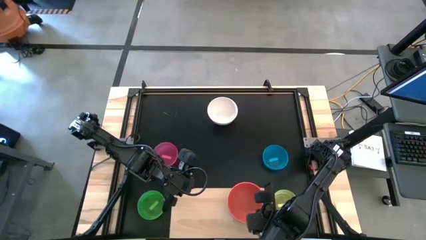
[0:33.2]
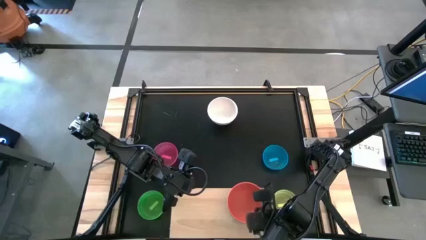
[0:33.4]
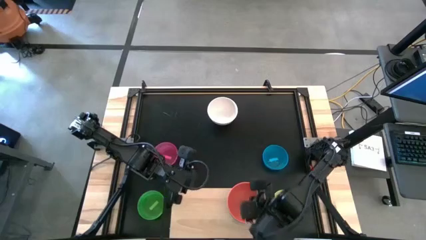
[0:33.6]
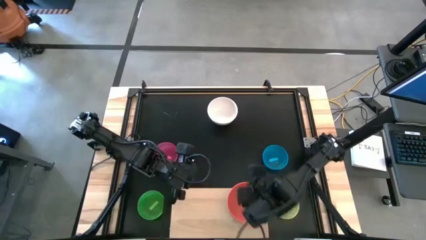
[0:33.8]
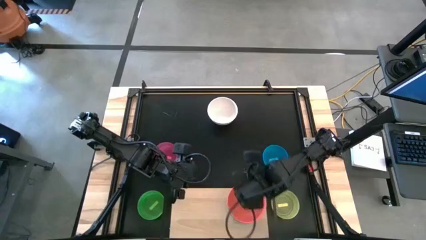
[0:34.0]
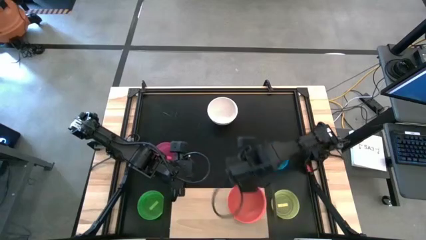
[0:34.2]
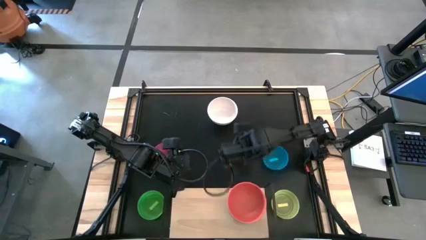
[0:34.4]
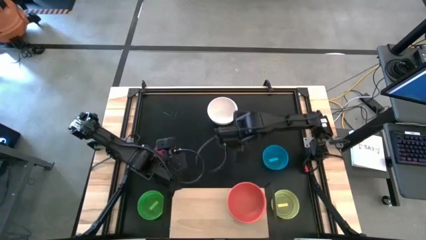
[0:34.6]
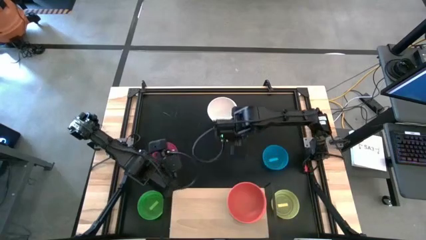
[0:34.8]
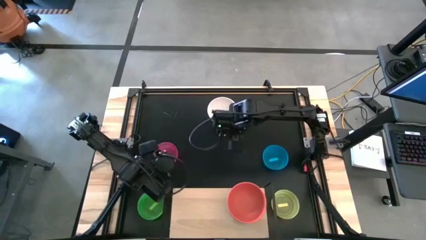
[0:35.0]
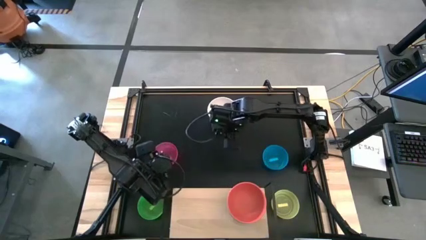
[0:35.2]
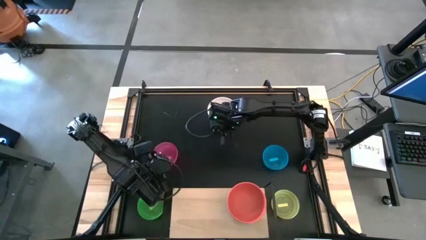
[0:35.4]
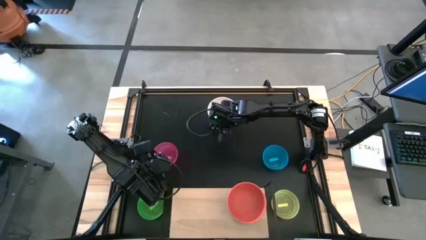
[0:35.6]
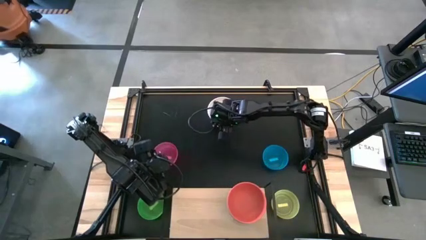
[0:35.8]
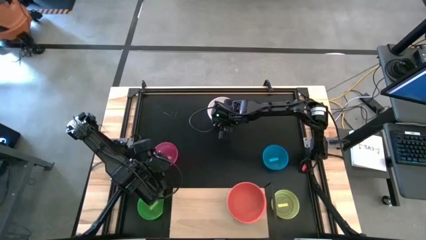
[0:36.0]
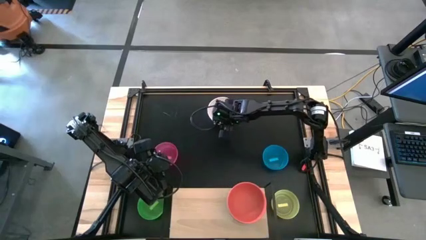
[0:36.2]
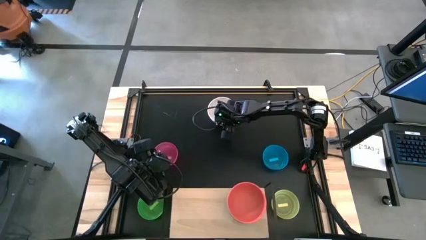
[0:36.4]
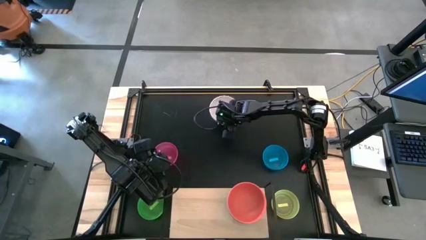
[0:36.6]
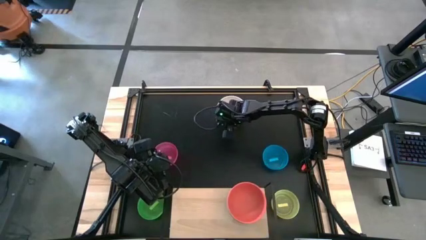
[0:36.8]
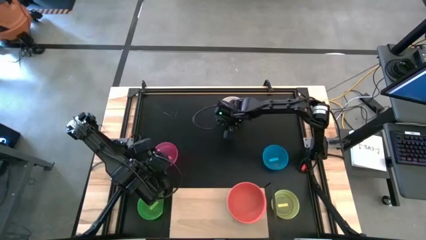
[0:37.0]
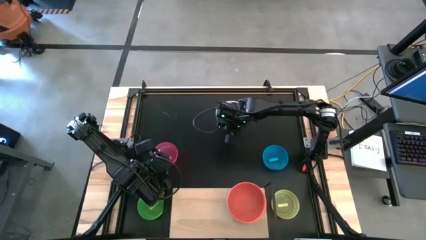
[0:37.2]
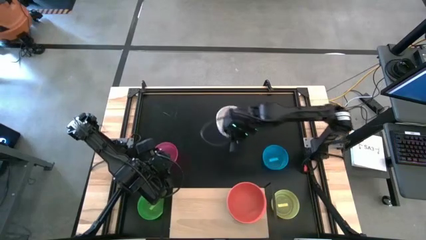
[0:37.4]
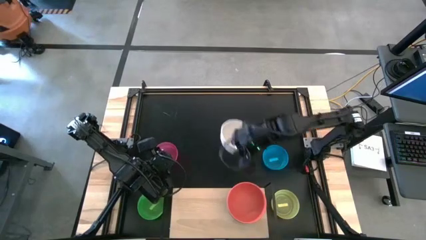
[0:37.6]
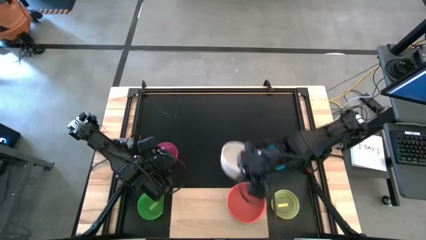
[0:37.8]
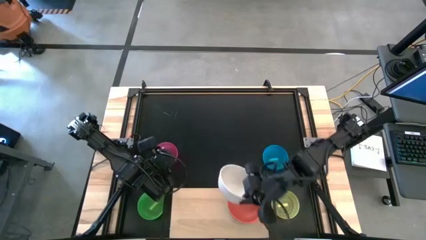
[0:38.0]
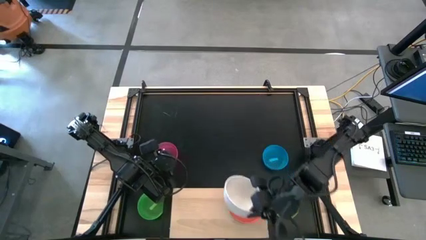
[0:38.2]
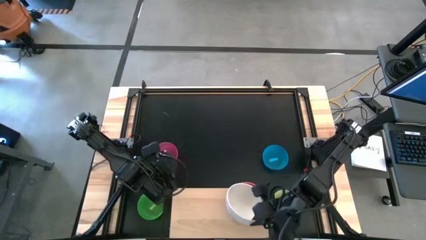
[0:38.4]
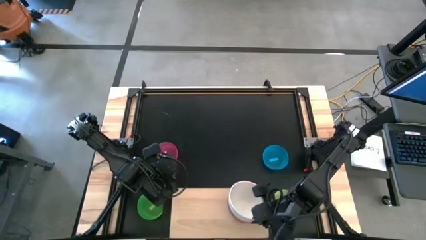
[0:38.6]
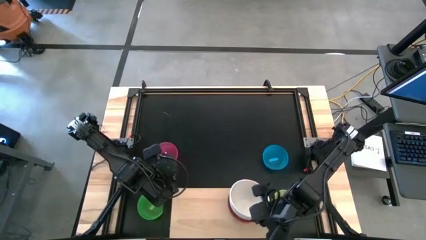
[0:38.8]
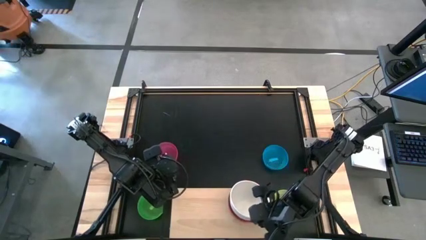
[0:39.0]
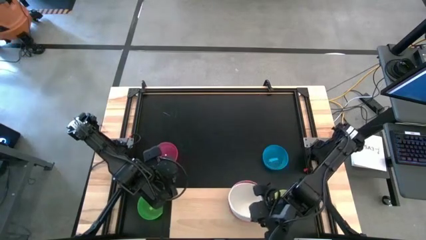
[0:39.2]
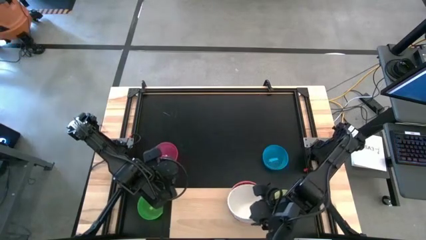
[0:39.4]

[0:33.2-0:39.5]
Task: Place and stack bowls onto a shelf
Stack the white bowl on top of the orange bowl on the shelf

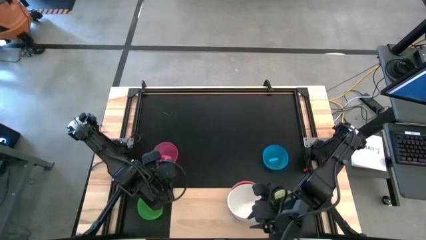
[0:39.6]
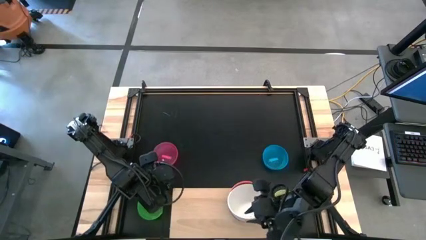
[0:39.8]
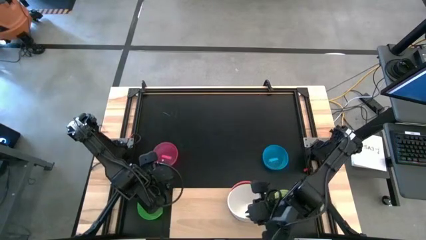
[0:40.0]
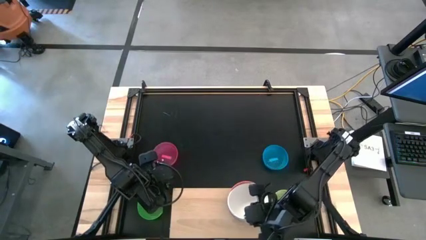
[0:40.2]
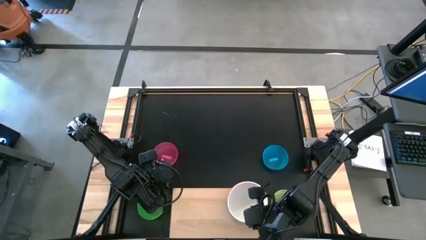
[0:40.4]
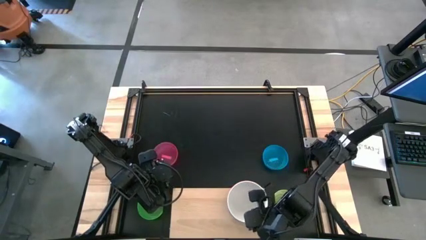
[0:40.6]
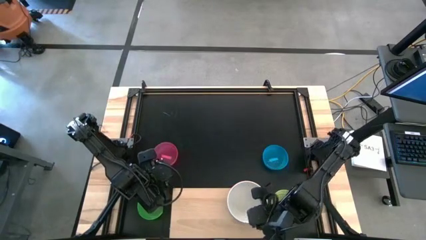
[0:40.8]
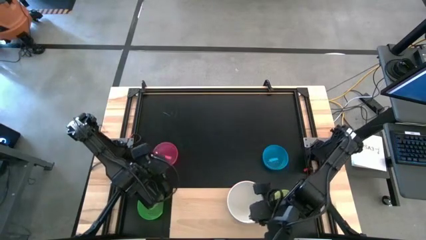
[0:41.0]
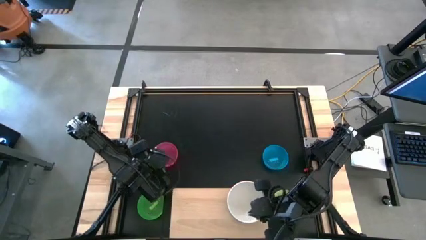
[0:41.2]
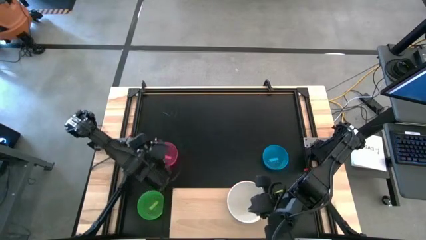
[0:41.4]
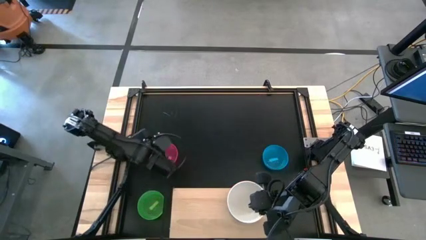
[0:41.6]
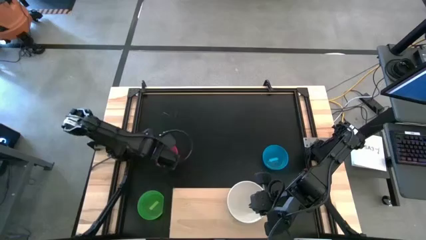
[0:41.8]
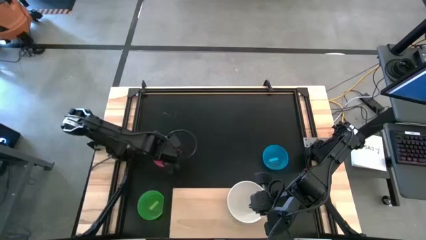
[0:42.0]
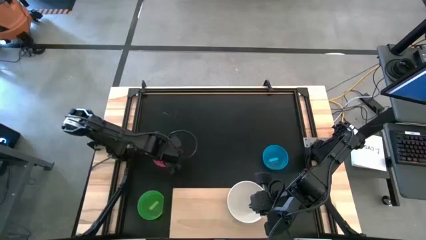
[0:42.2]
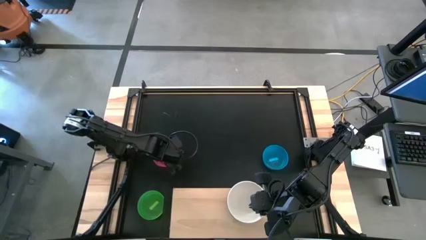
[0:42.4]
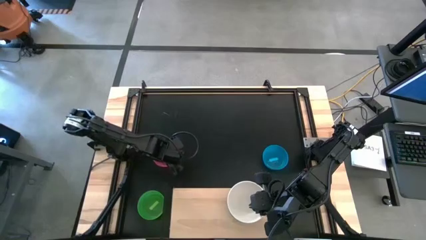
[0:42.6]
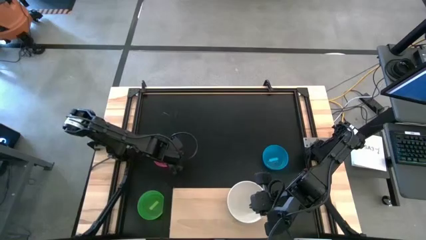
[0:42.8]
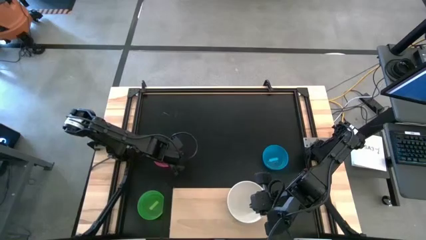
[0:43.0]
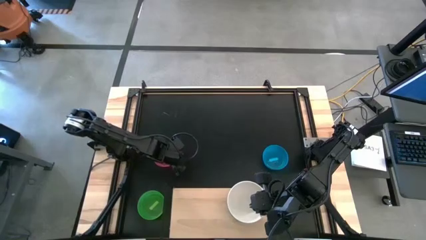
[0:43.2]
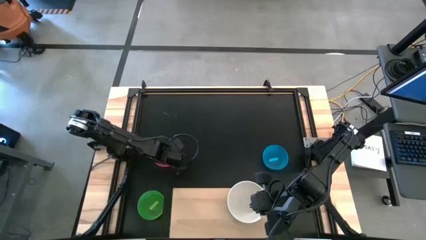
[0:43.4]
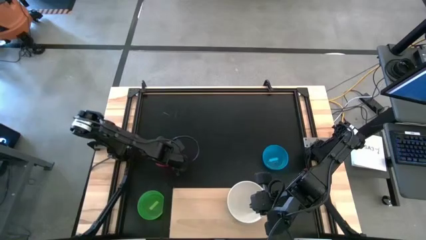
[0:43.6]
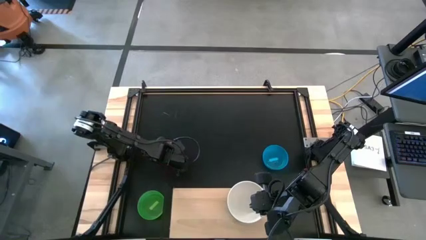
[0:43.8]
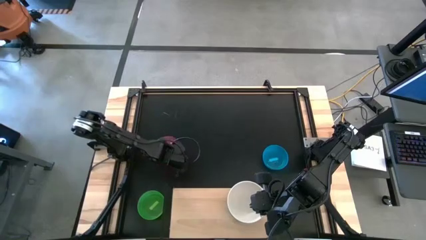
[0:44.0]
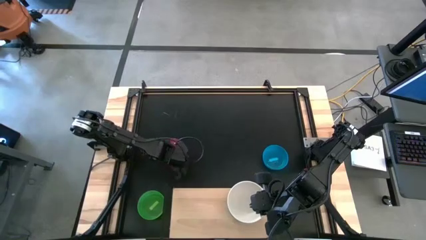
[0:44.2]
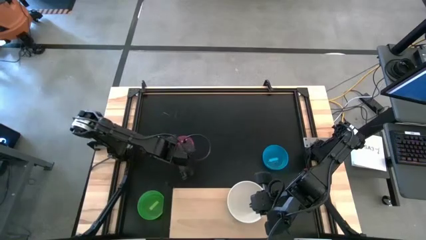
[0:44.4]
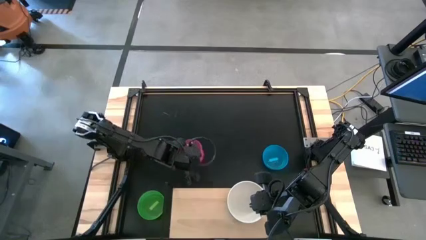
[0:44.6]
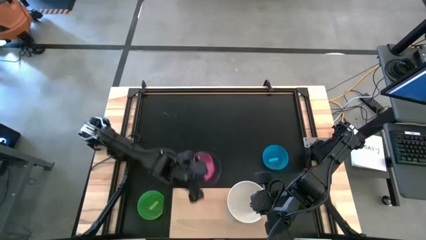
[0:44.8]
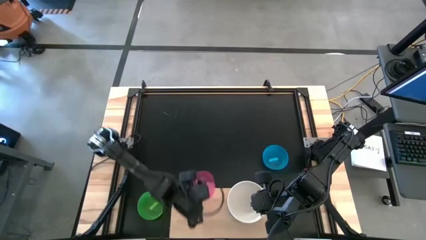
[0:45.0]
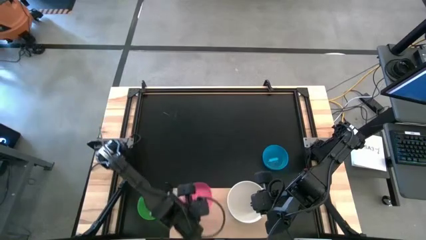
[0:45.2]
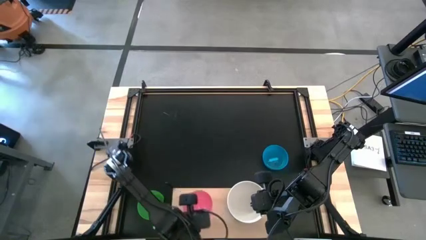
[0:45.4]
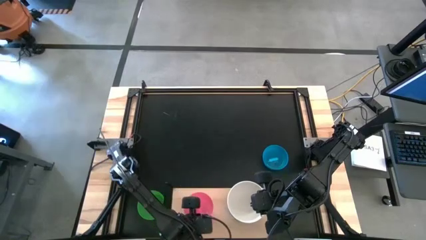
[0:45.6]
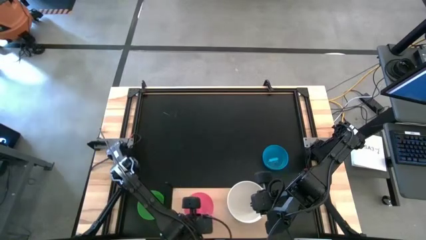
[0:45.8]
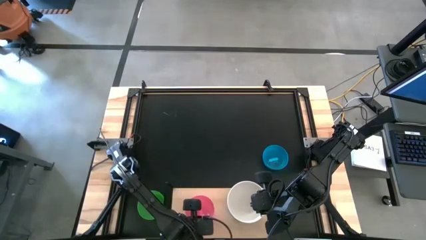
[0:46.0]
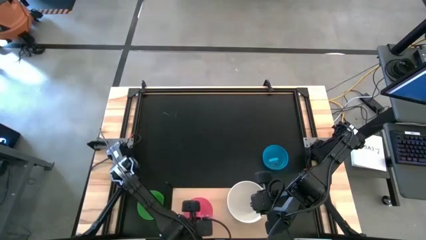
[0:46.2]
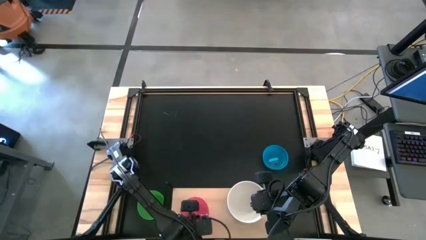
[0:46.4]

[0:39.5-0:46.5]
Put the light pink bowl on the shelf
